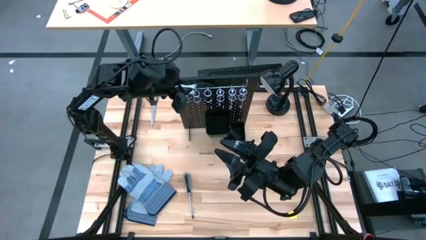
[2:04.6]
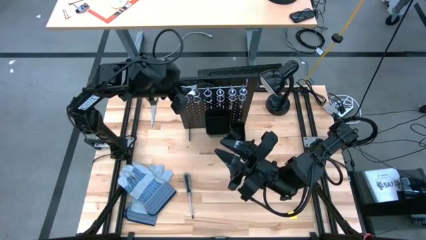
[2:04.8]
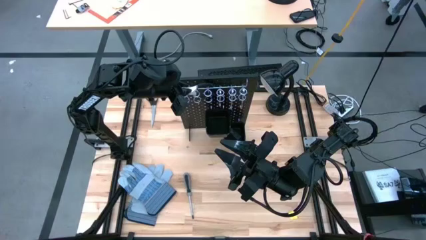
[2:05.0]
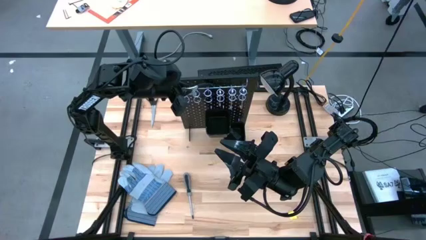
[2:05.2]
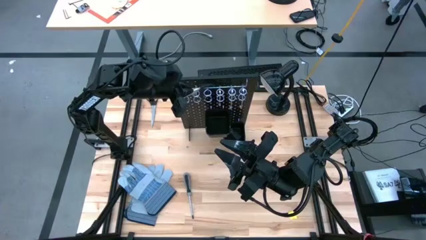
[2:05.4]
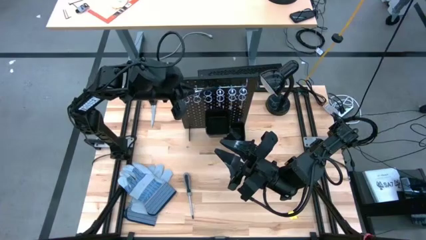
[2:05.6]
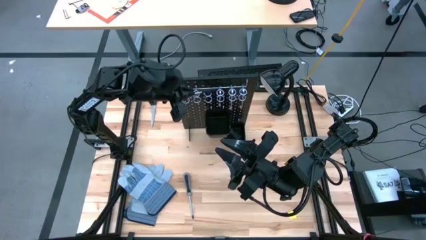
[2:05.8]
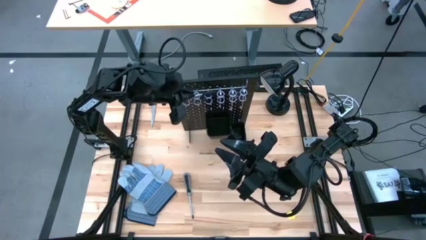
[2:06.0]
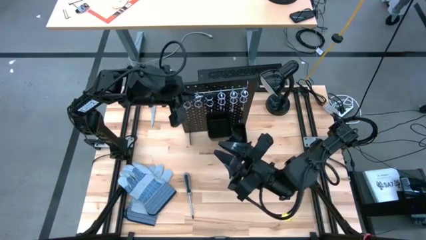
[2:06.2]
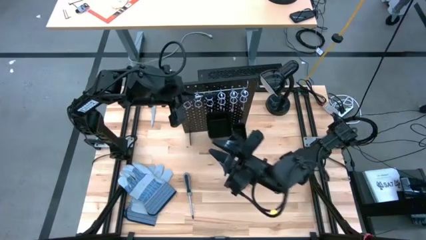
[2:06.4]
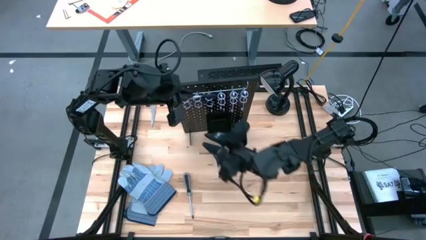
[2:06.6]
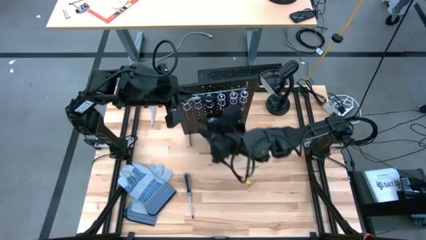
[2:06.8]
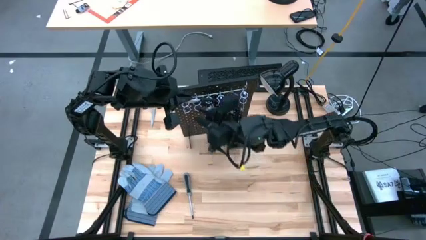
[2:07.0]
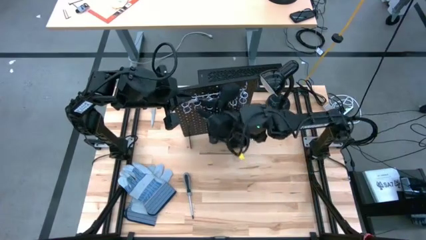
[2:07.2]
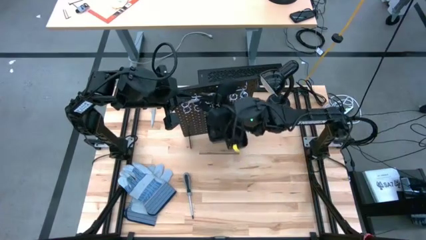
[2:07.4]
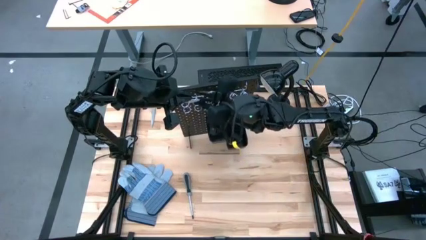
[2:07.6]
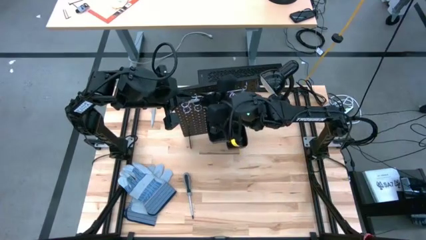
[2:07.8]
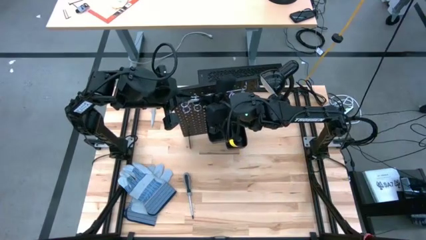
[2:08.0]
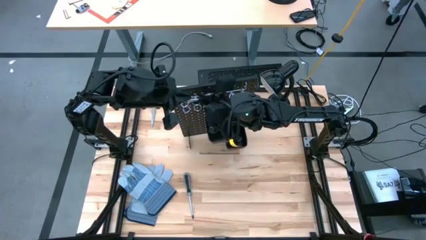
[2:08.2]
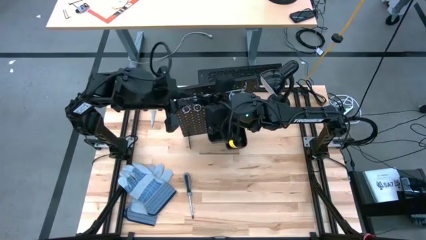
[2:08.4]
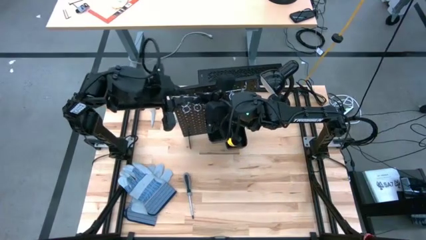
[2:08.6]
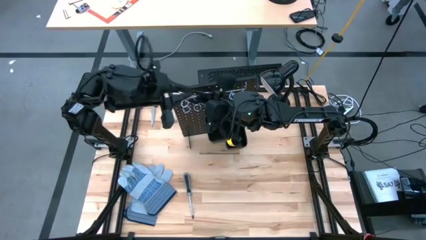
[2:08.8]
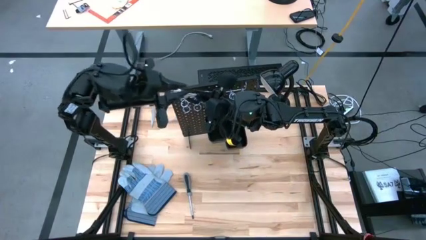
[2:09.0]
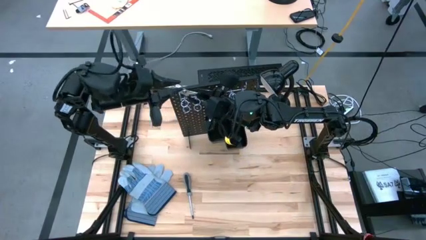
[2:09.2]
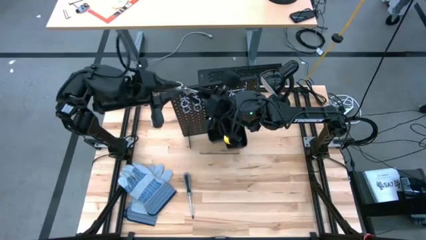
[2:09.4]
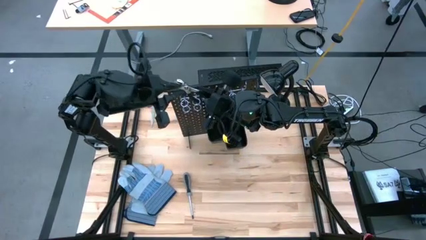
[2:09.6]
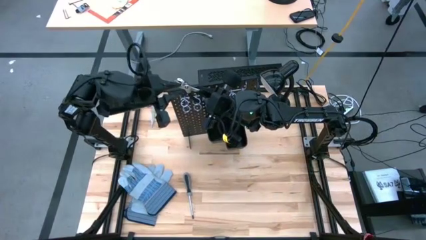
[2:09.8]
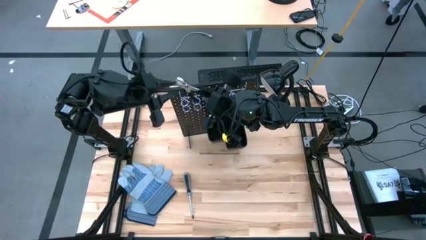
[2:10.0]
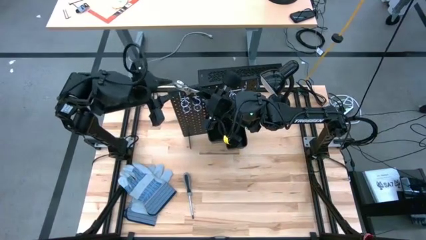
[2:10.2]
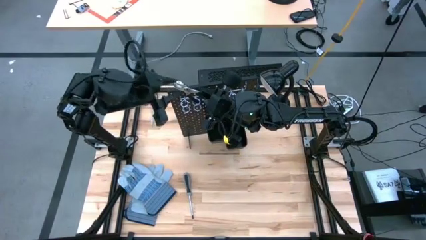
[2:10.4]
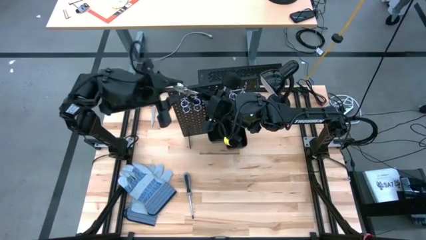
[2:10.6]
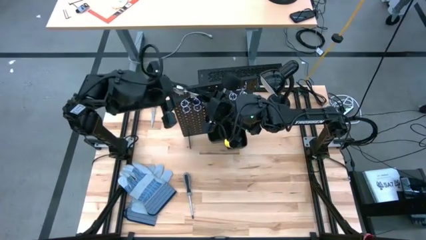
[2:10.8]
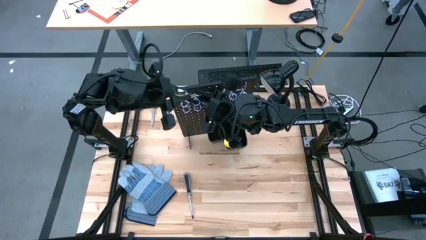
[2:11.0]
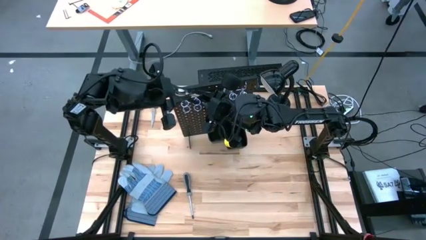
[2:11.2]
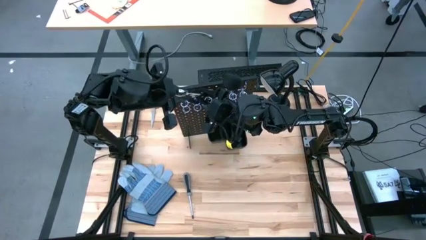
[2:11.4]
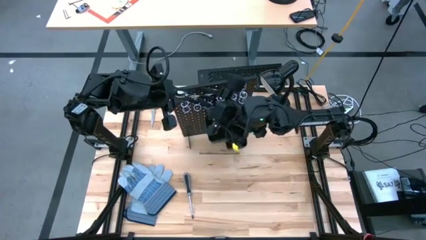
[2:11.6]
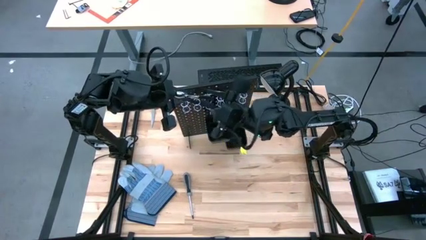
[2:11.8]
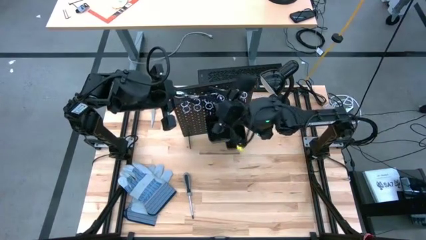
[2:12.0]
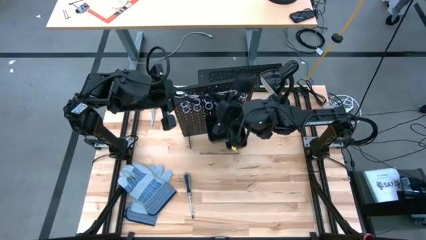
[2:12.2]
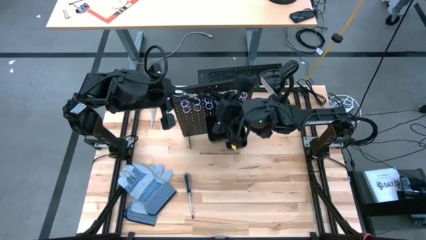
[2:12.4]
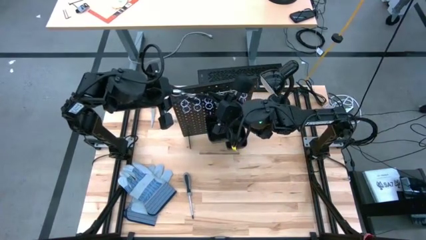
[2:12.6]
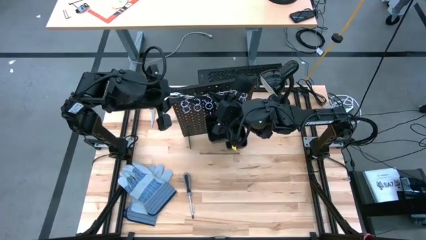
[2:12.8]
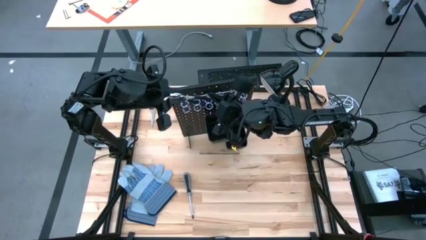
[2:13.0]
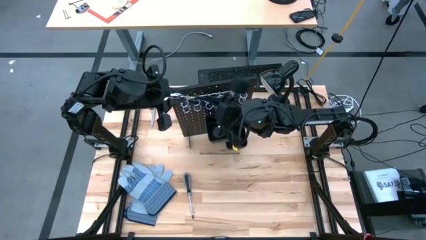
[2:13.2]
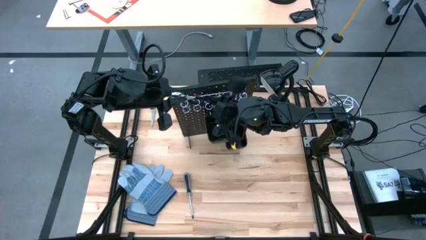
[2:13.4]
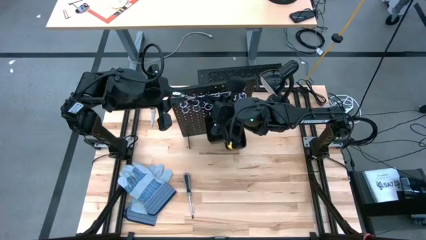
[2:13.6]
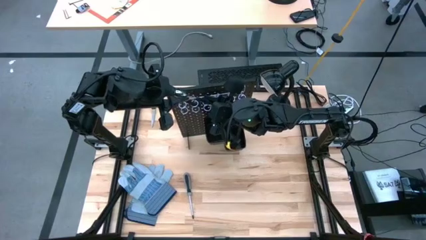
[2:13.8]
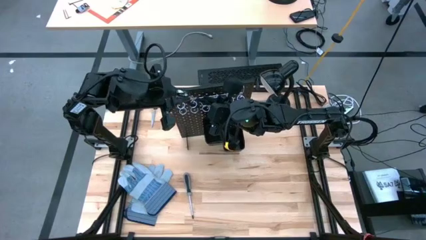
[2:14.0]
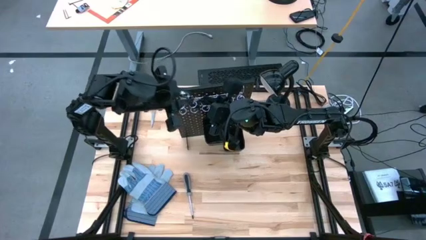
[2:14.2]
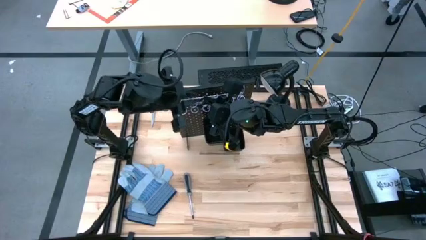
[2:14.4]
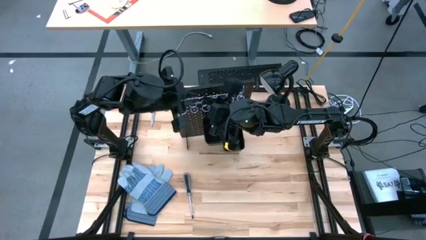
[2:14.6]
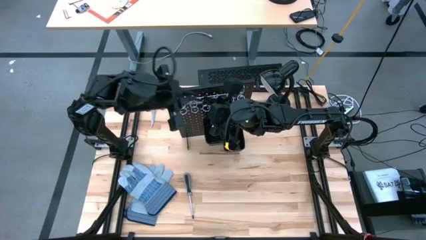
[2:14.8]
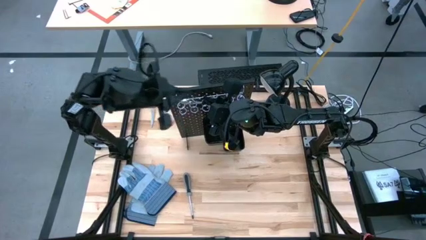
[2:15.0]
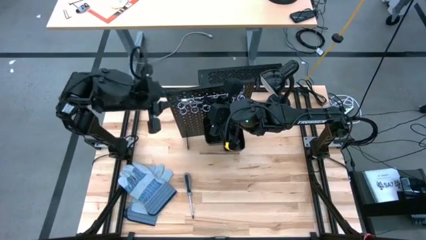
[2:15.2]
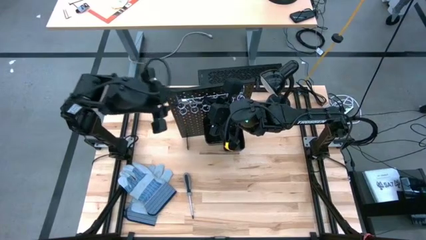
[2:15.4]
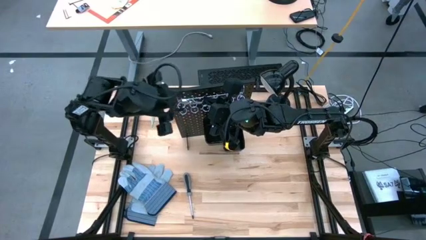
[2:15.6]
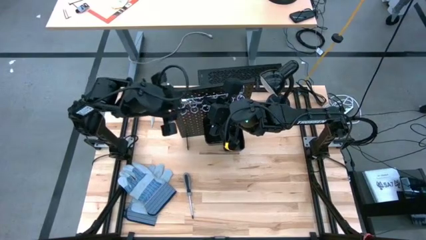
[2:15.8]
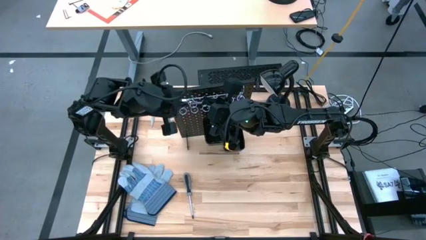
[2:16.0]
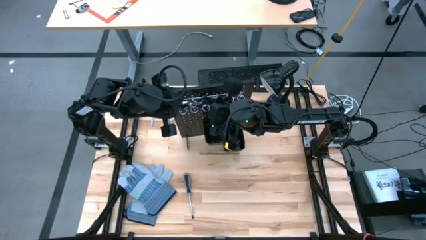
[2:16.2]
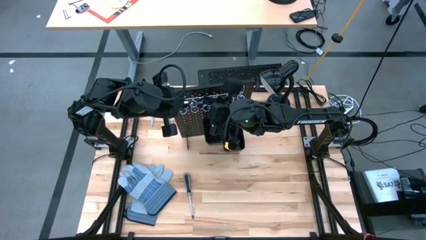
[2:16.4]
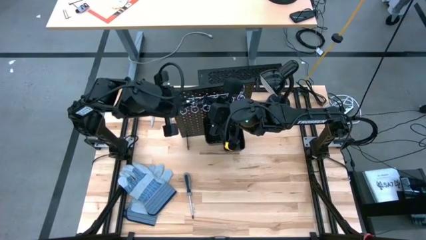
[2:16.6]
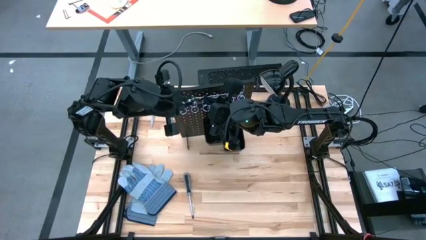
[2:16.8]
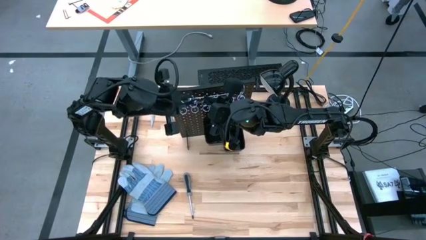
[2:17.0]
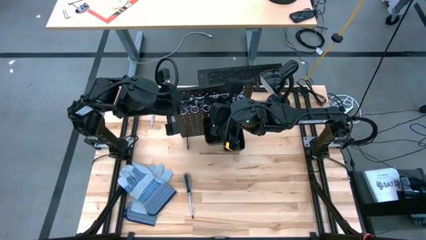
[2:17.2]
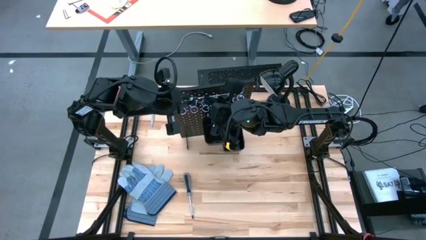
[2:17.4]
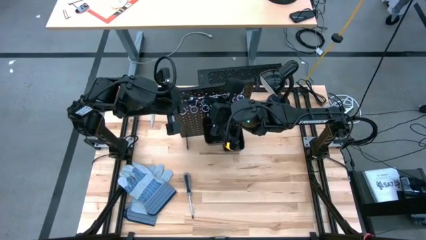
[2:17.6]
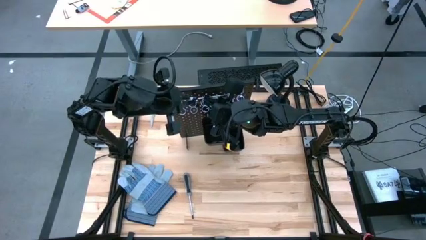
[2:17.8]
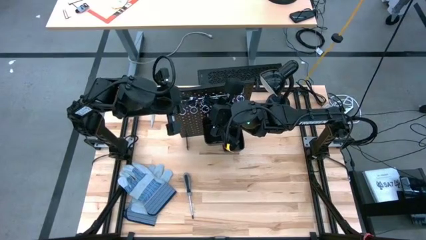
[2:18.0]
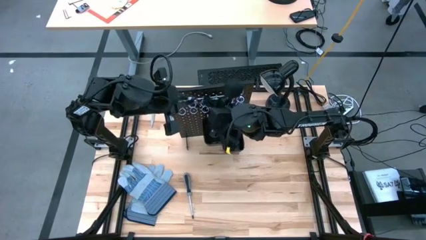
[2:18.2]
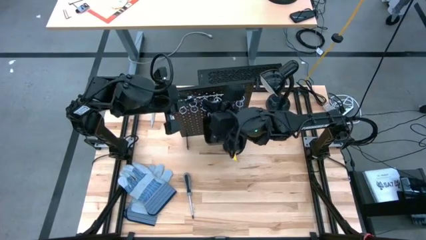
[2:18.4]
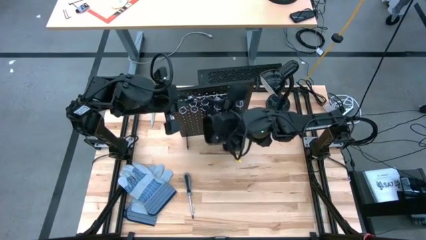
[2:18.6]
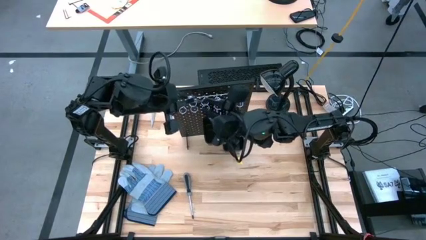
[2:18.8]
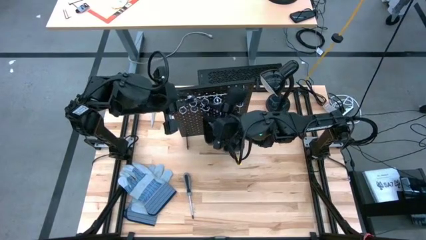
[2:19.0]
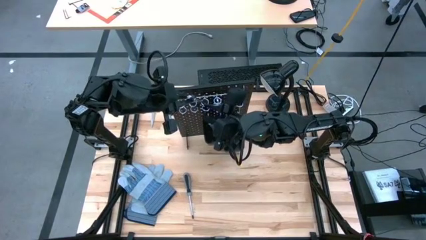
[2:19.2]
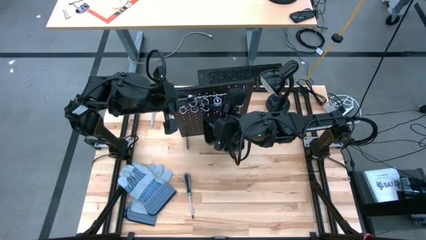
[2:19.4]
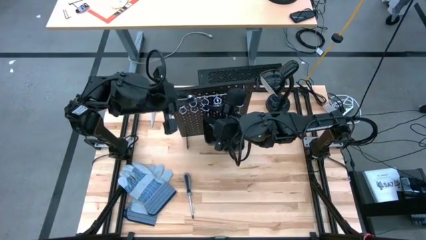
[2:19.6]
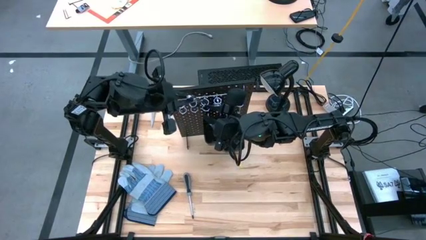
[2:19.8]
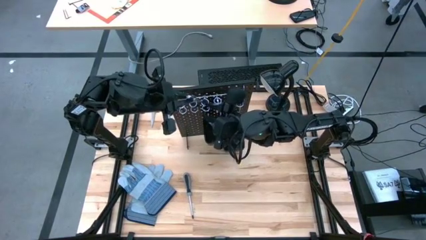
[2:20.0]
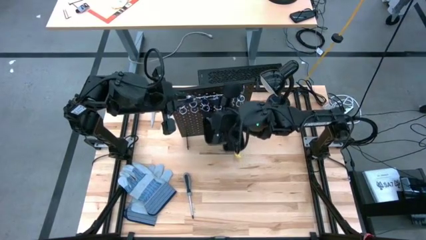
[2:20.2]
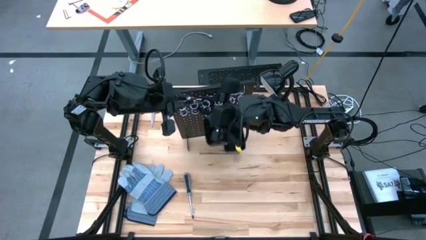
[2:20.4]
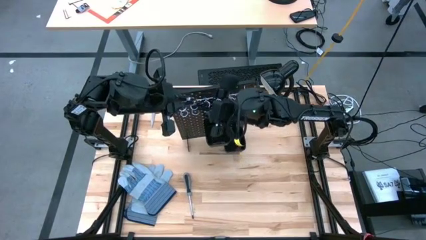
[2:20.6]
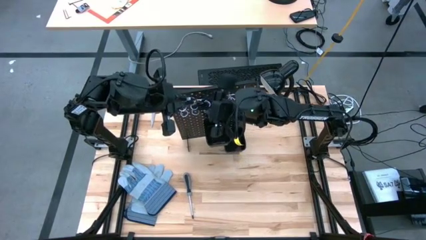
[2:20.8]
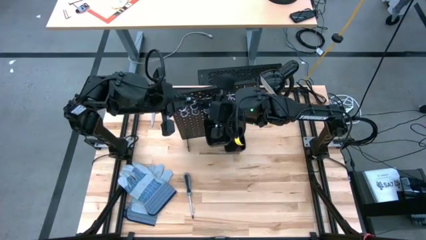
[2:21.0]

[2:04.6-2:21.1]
Task: Hang tools onto peg board
Hang the black pliers on the black pegboard
